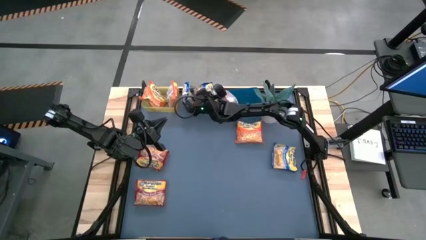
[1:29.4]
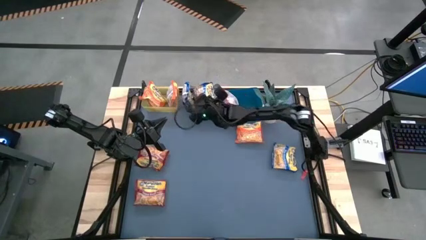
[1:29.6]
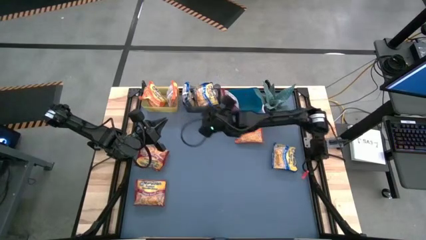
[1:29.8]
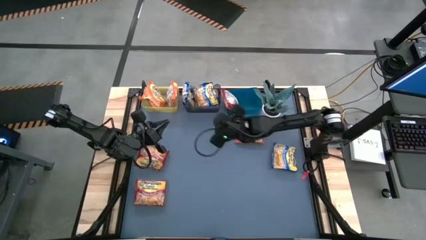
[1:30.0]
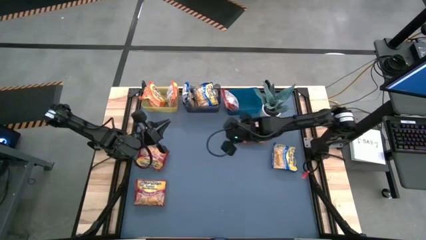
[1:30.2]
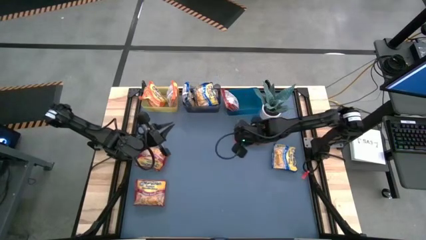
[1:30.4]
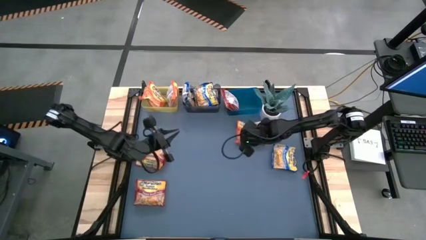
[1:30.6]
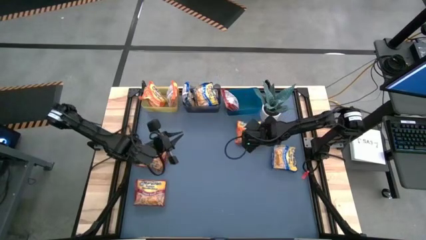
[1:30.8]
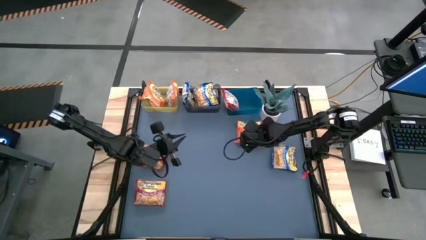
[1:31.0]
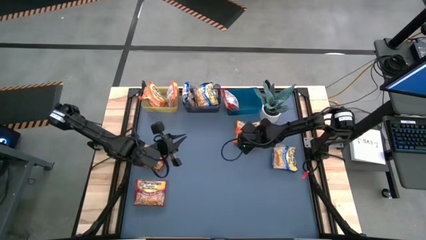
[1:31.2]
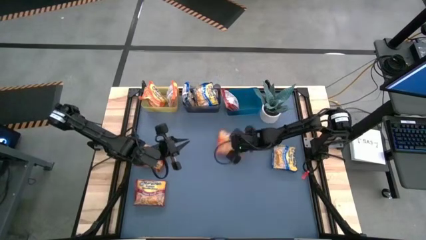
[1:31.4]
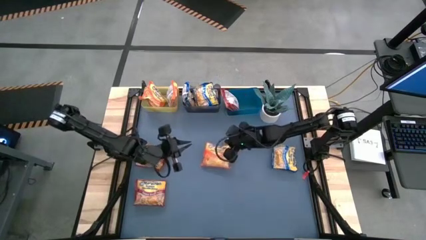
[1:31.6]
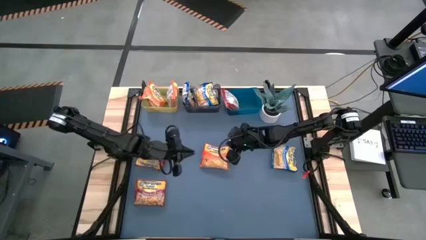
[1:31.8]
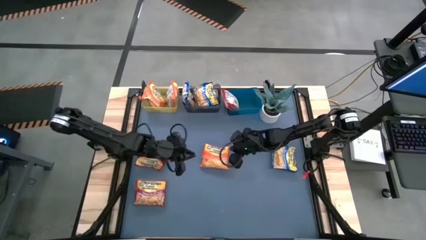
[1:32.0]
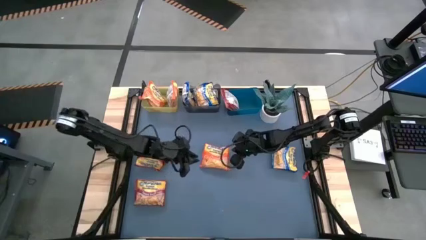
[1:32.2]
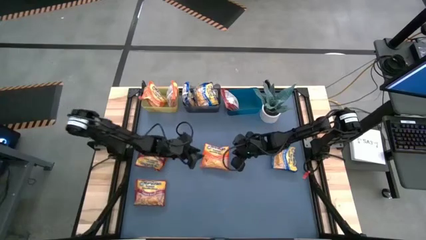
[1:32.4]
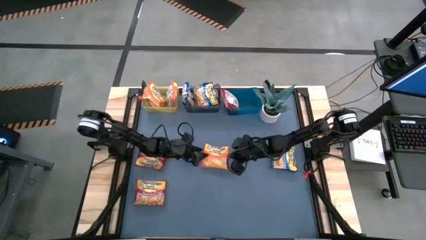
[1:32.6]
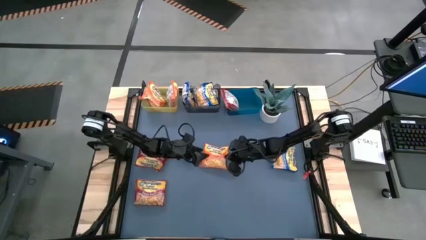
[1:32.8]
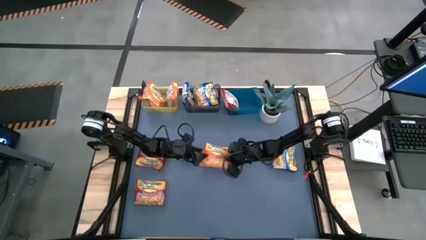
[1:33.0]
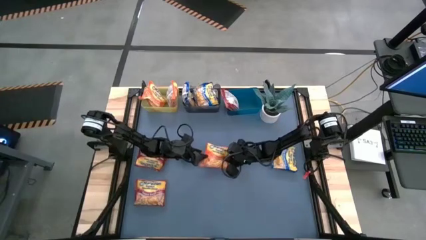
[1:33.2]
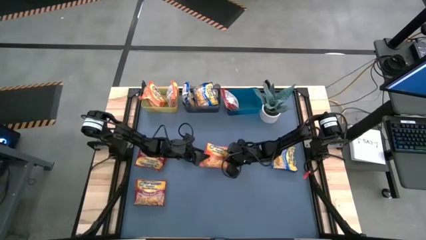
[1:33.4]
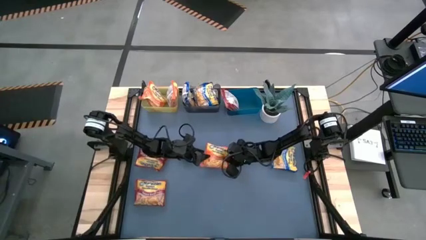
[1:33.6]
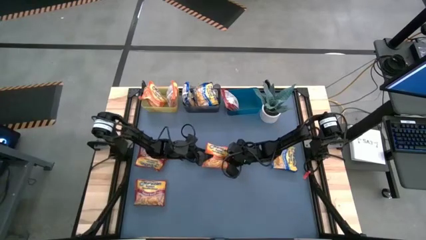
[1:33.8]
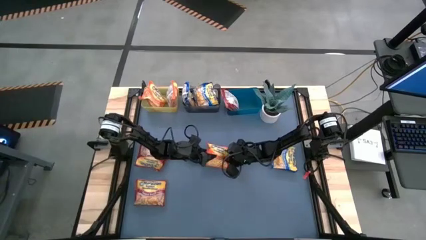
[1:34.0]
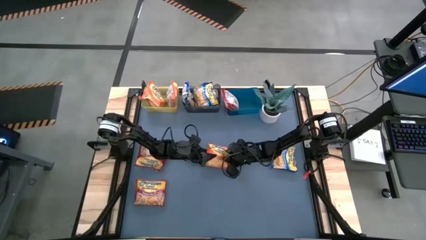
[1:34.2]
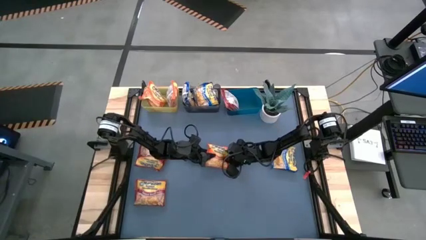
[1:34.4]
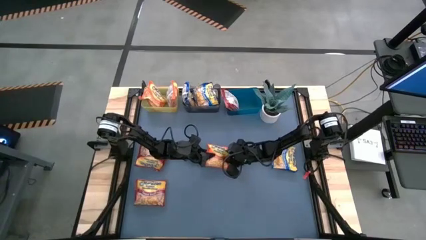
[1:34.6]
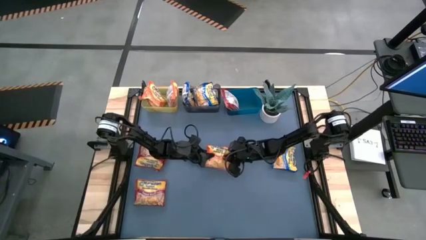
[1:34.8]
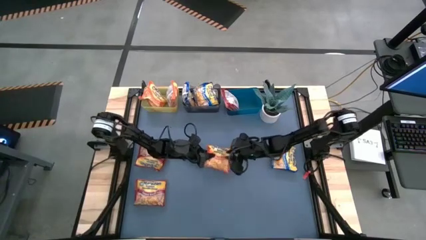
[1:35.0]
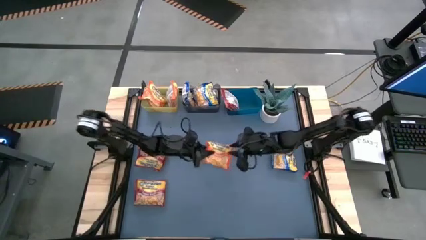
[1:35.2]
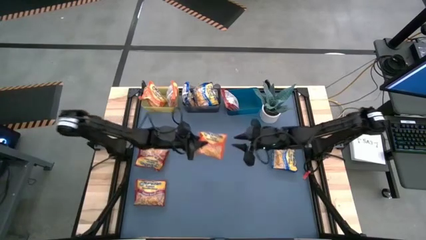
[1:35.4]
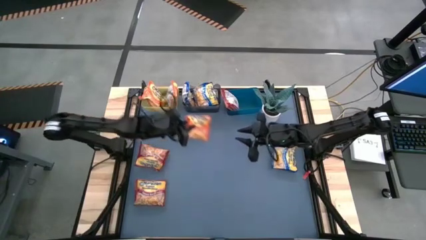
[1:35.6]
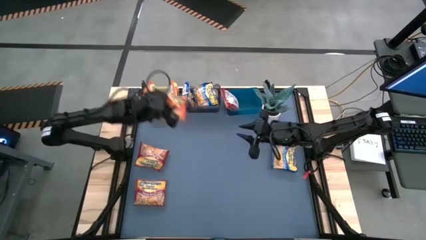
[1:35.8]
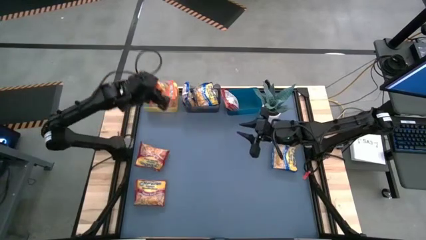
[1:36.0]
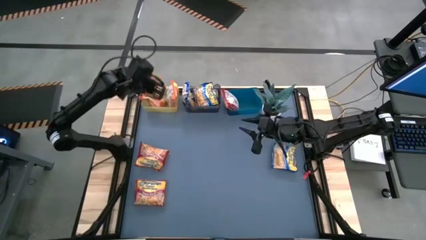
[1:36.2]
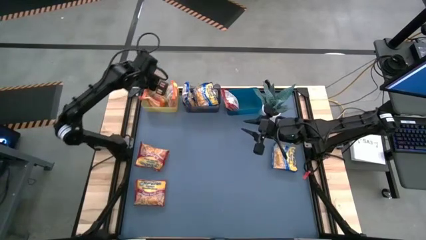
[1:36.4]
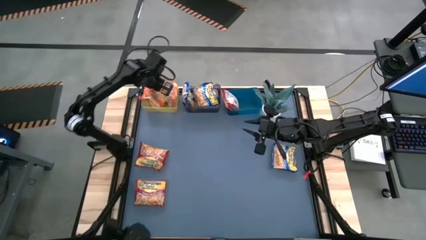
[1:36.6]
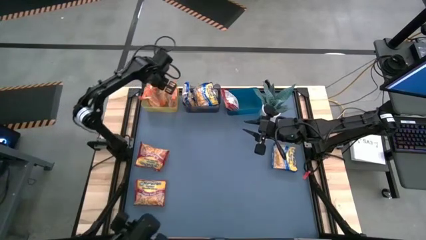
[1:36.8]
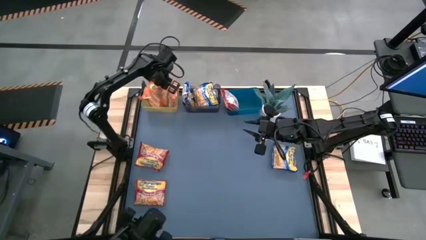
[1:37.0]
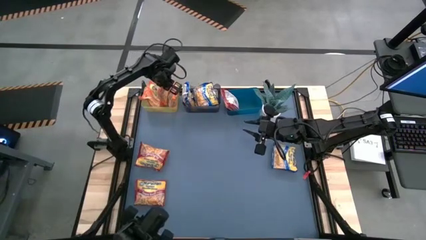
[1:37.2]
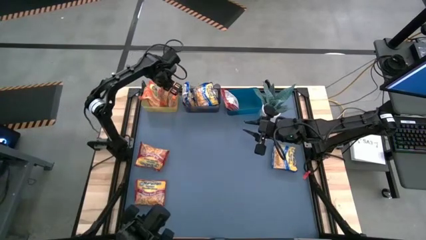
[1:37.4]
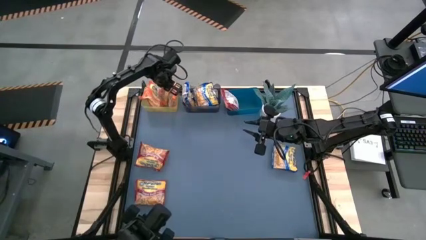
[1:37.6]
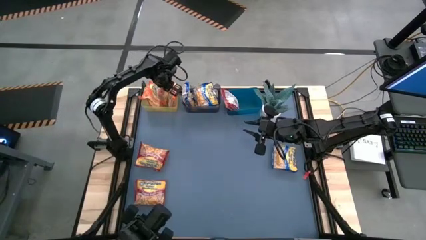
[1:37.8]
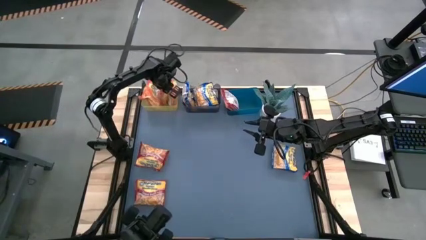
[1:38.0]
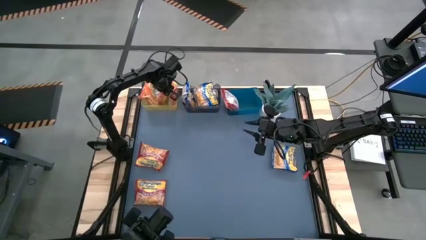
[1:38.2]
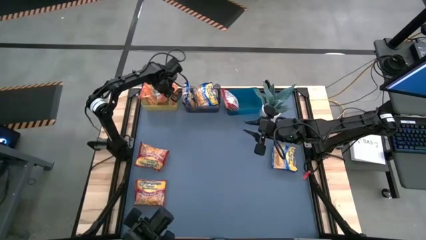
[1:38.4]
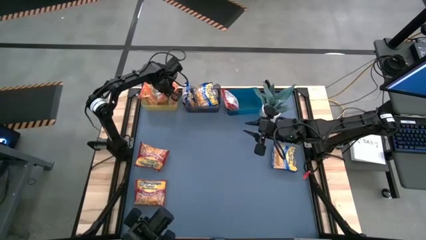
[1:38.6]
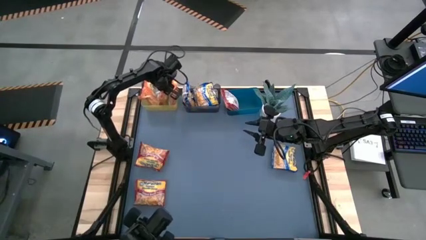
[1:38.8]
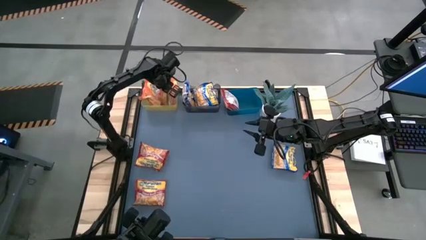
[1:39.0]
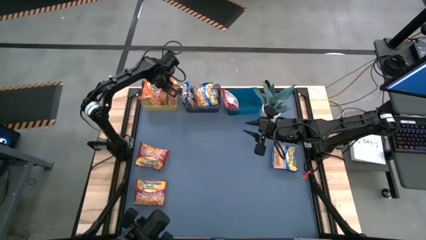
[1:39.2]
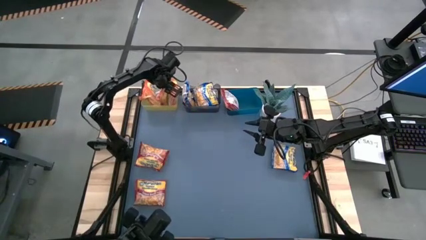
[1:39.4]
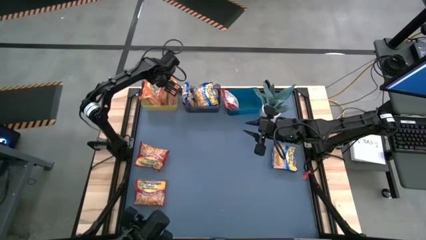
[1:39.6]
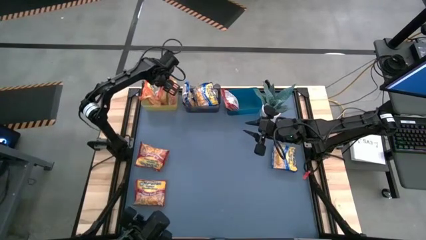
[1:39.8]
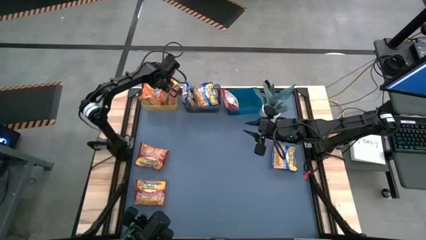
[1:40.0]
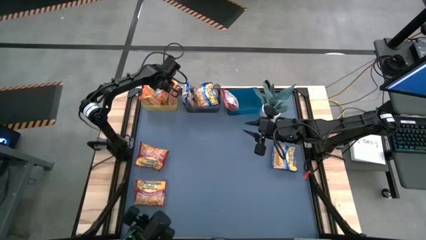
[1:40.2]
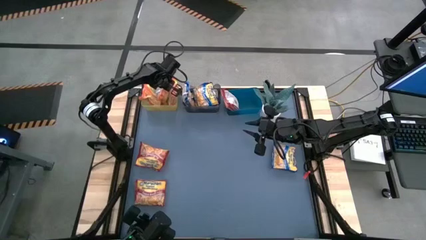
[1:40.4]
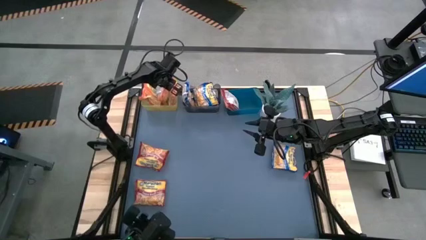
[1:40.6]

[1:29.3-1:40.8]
Task: Sort Maruchan noodles
Put the orange noodle pack into the yellow bin
